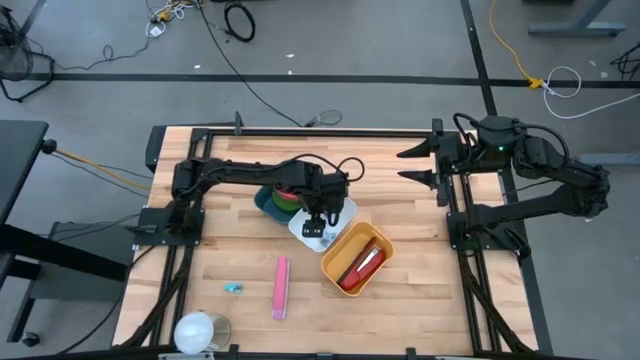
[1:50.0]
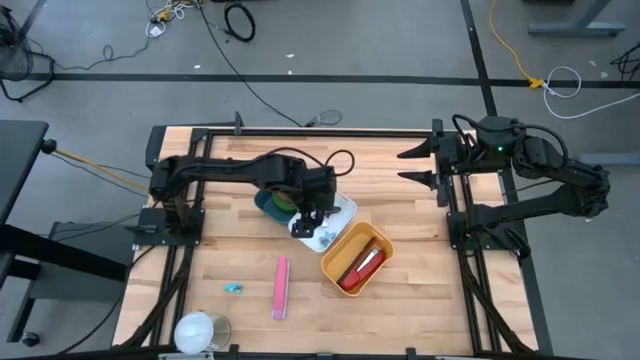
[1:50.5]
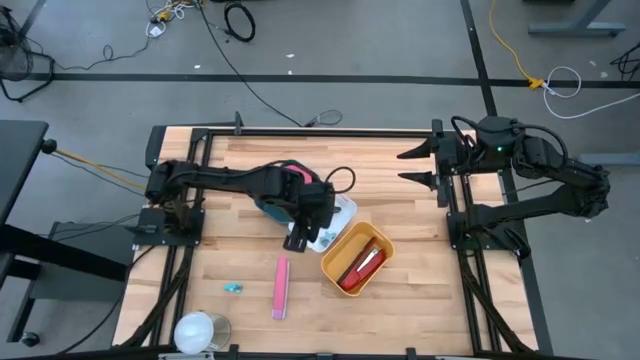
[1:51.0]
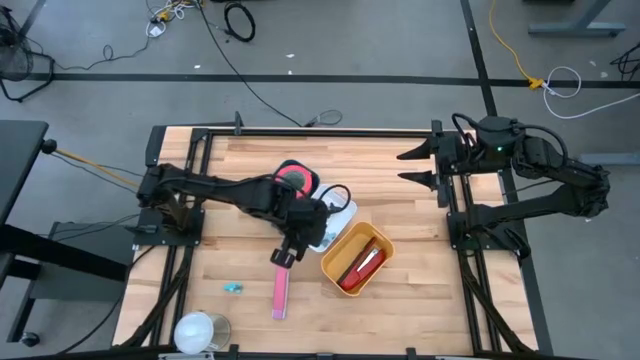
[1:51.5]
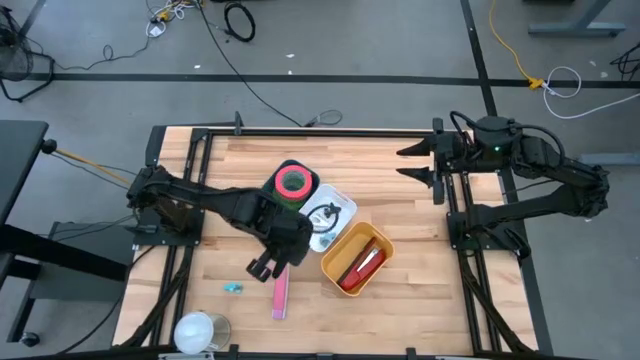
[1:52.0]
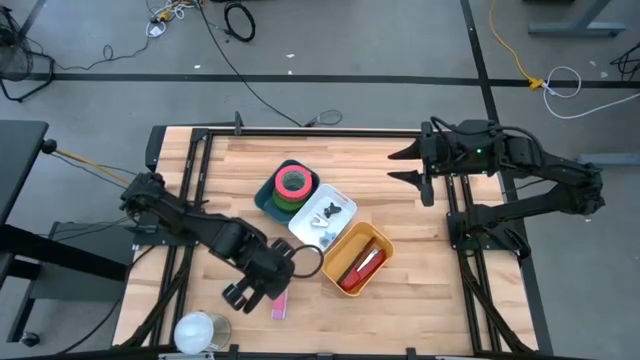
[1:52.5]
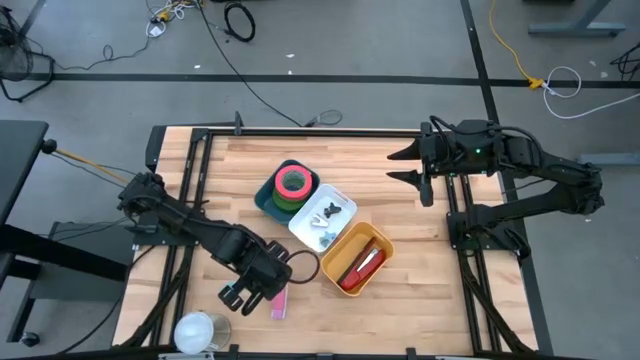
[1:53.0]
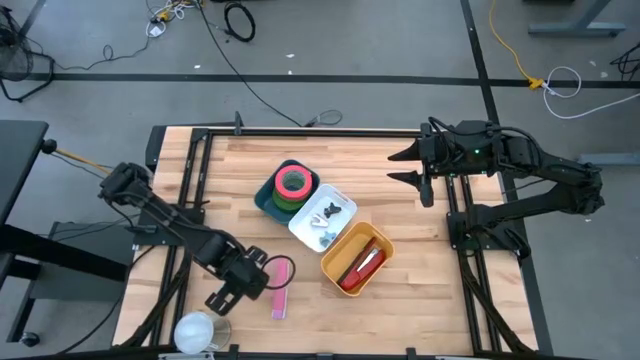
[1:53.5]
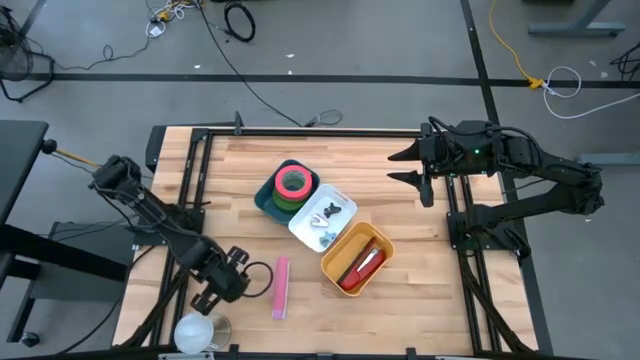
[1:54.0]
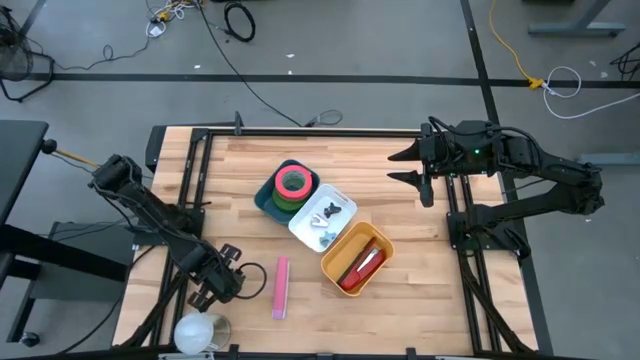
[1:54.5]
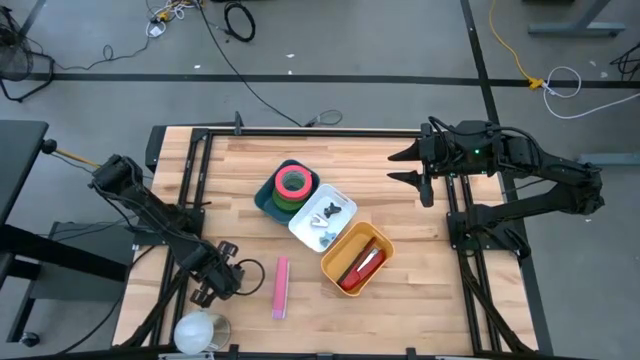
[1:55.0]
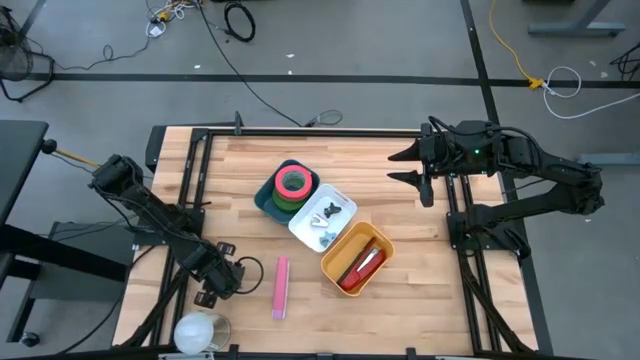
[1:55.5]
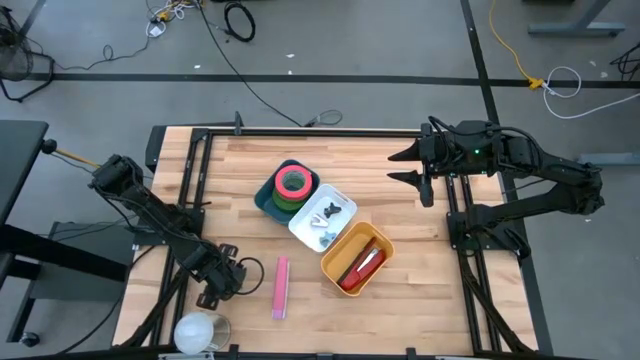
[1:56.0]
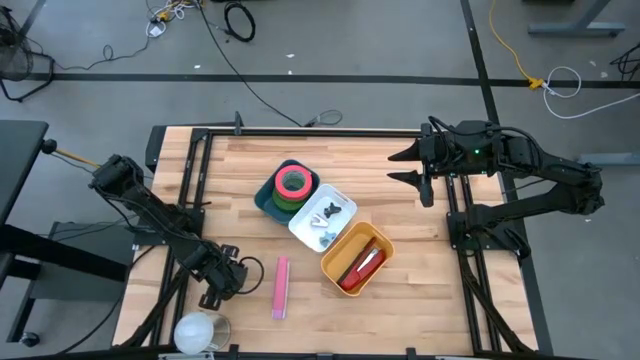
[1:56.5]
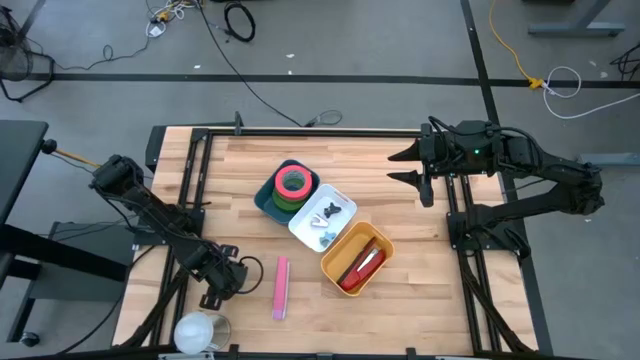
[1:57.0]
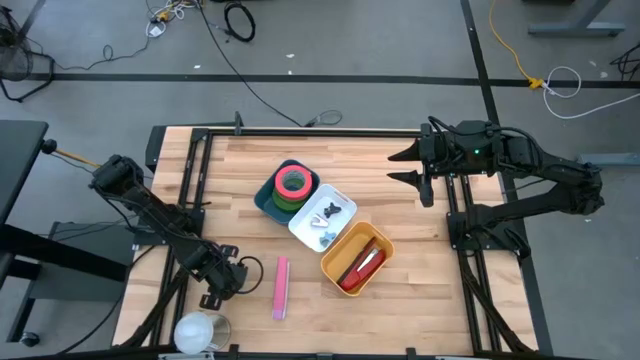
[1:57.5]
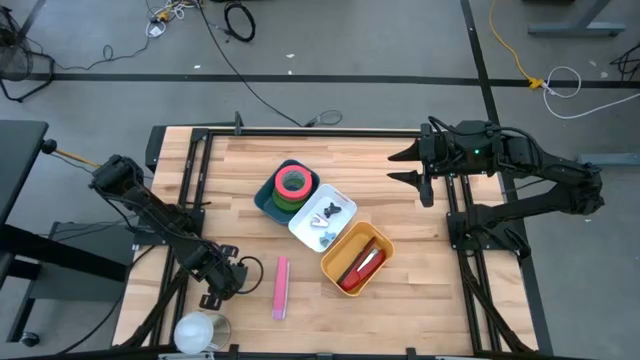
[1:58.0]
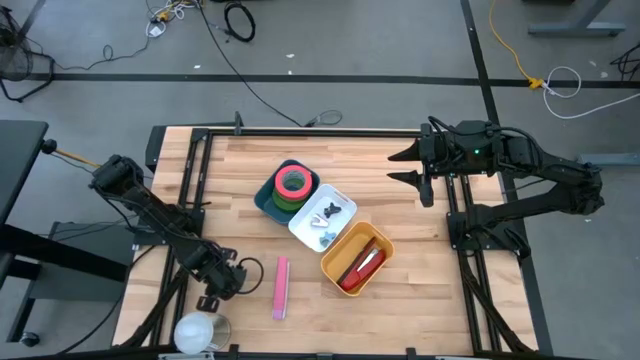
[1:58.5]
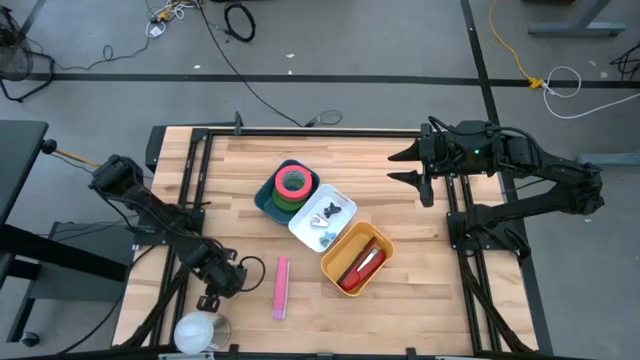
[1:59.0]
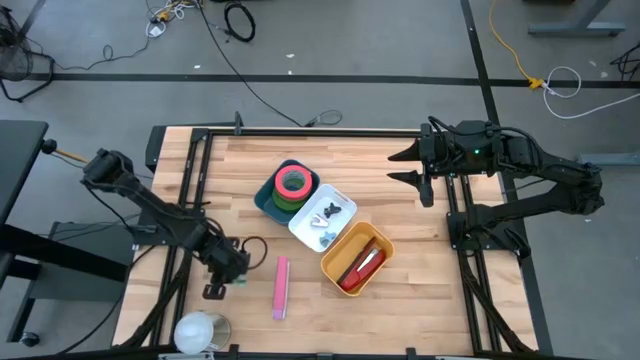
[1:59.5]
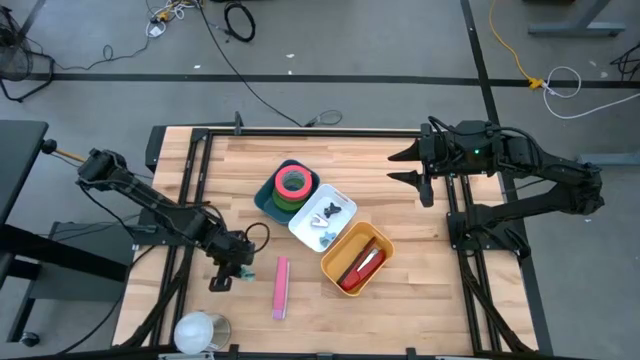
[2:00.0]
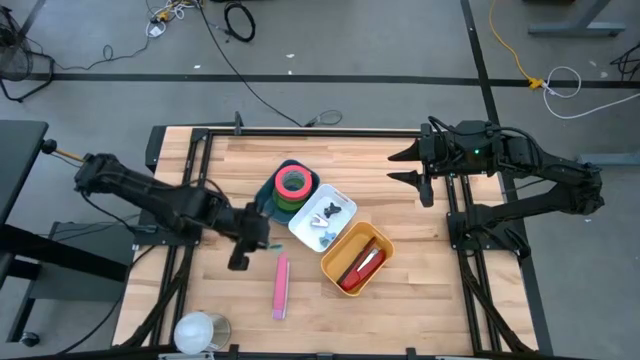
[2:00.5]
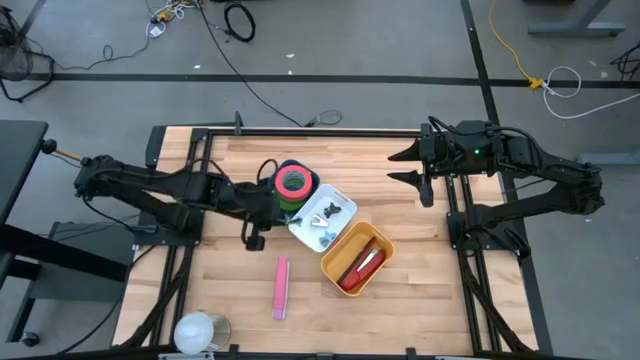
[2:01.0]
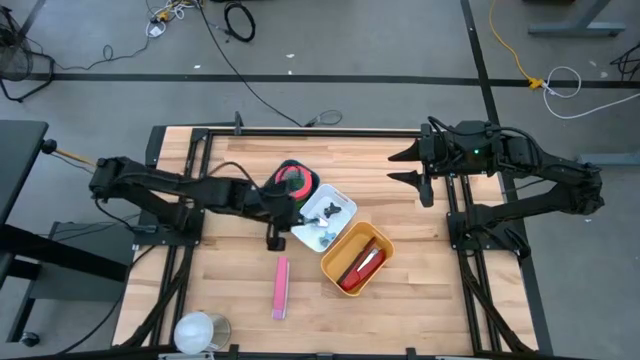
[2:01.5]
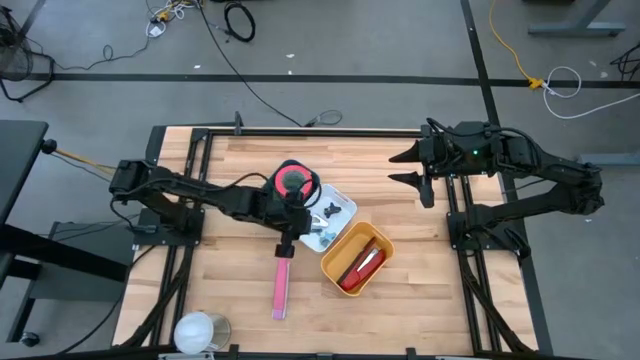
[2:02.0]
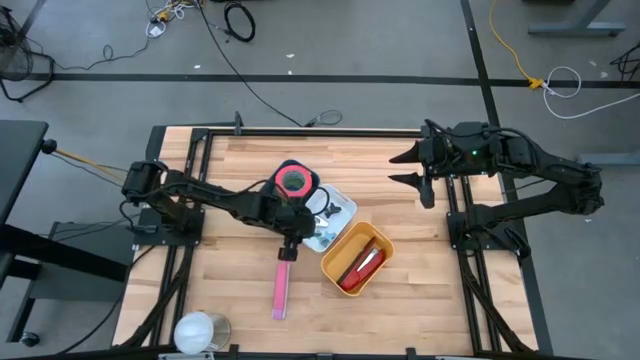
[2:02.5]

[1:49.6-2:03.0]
Task: Pick and place Stapler, Stapler remover, tape
Put the blue staple remover into the white bin

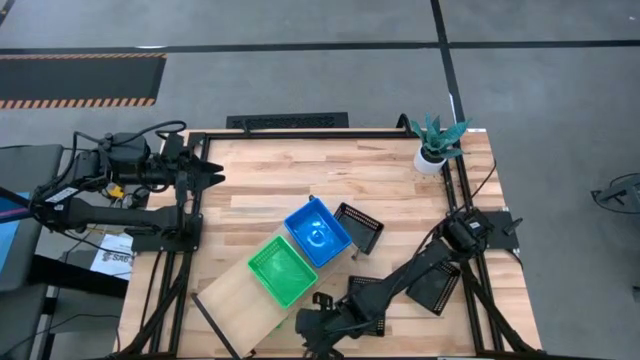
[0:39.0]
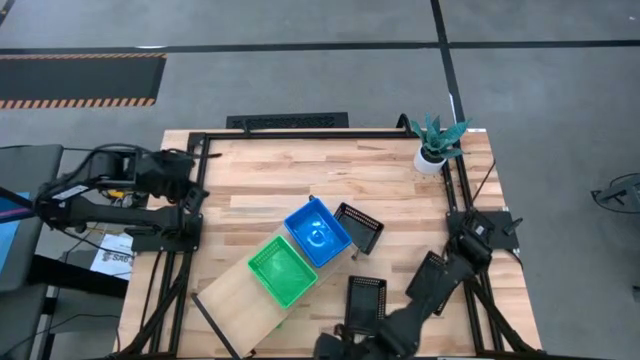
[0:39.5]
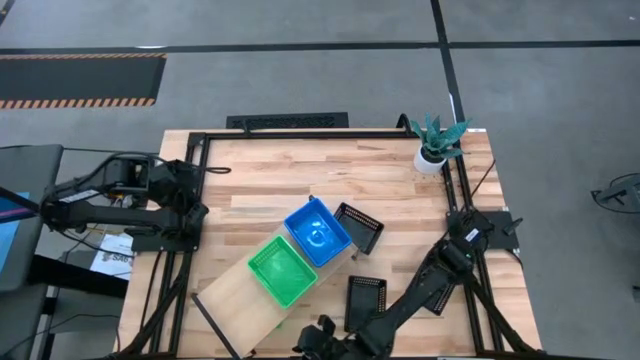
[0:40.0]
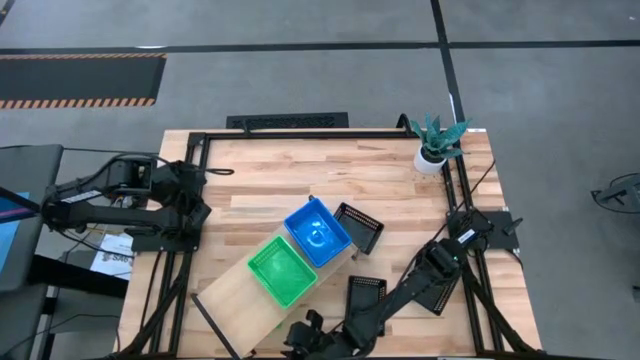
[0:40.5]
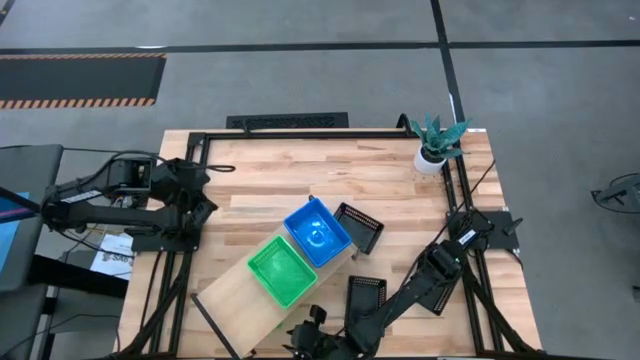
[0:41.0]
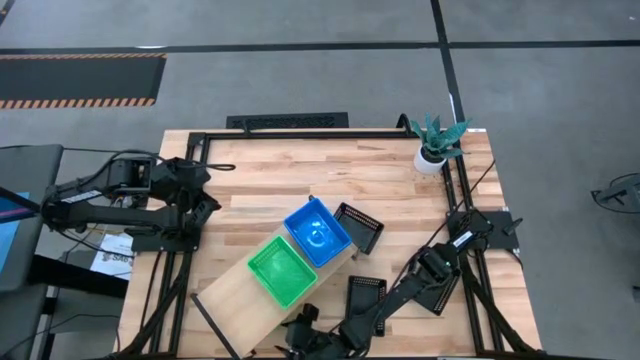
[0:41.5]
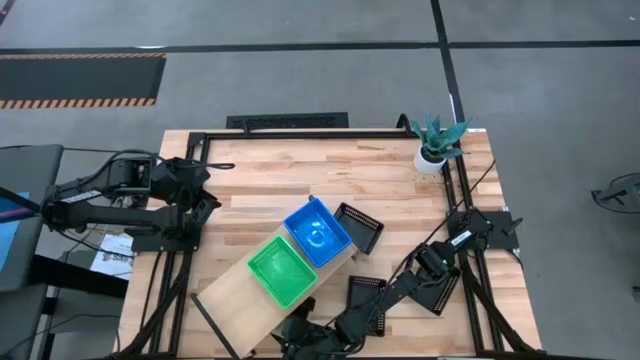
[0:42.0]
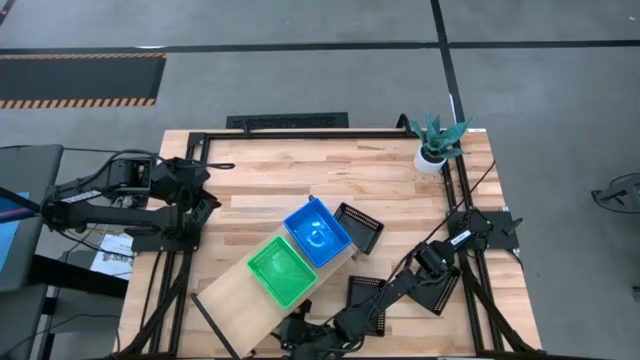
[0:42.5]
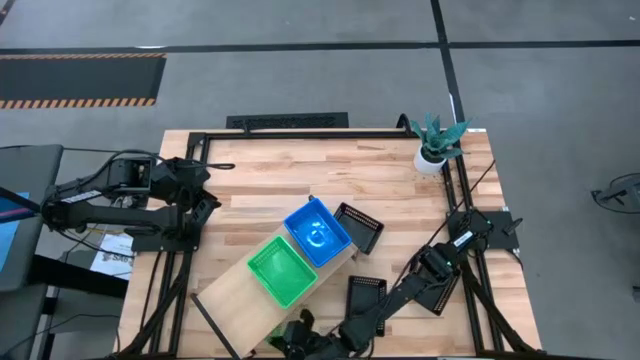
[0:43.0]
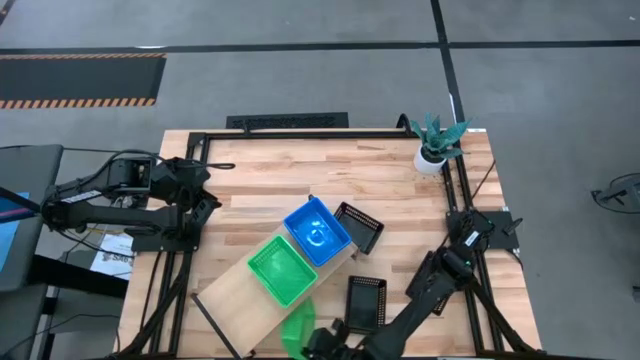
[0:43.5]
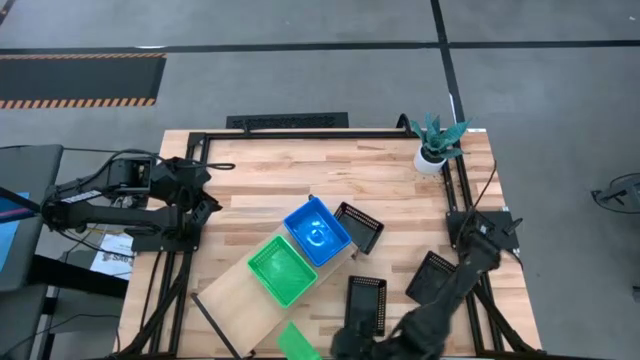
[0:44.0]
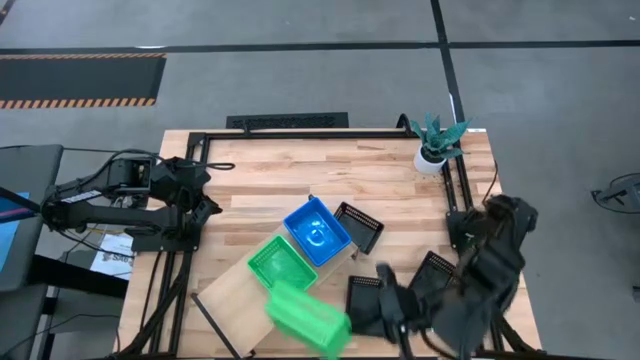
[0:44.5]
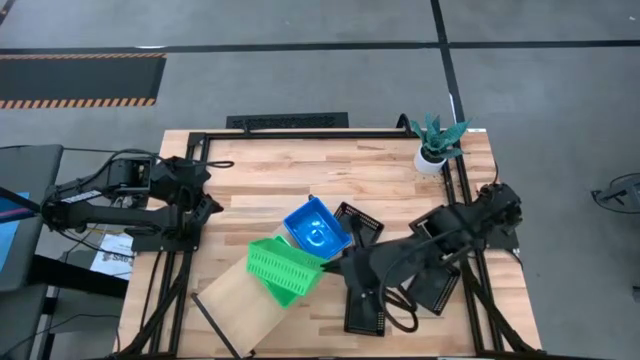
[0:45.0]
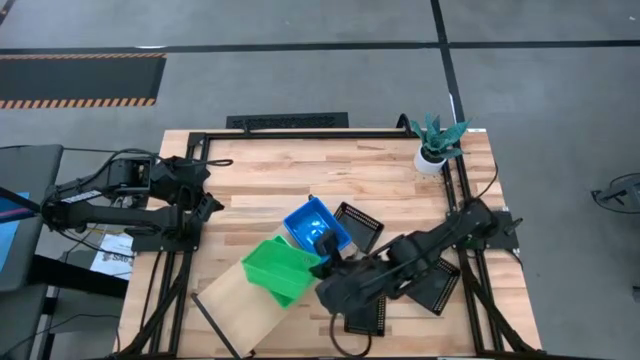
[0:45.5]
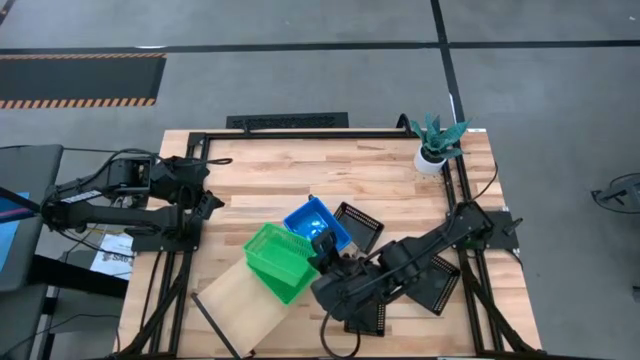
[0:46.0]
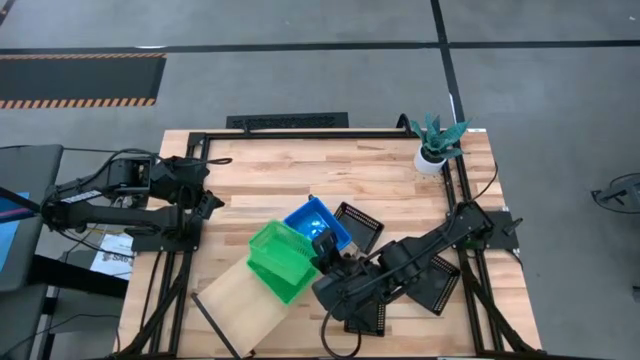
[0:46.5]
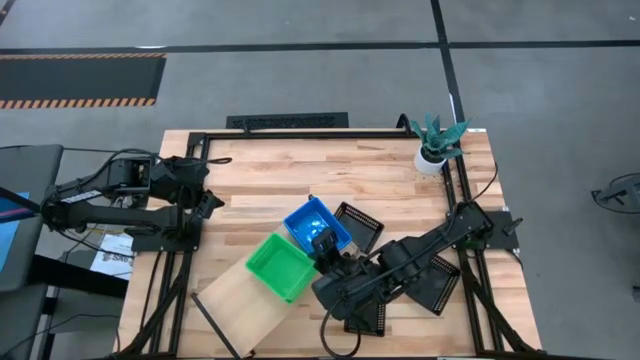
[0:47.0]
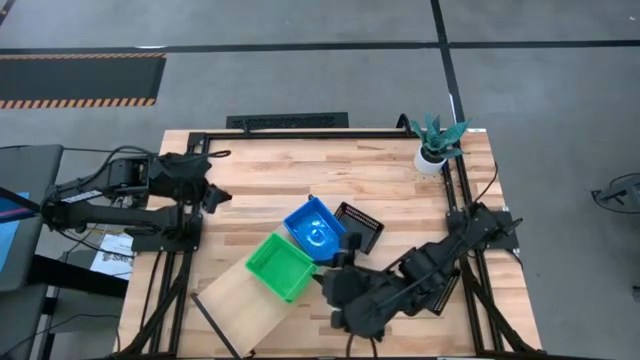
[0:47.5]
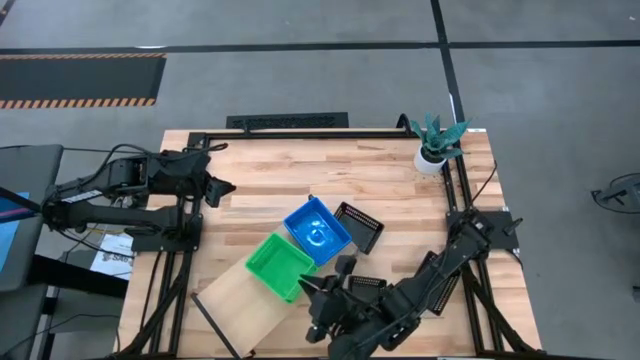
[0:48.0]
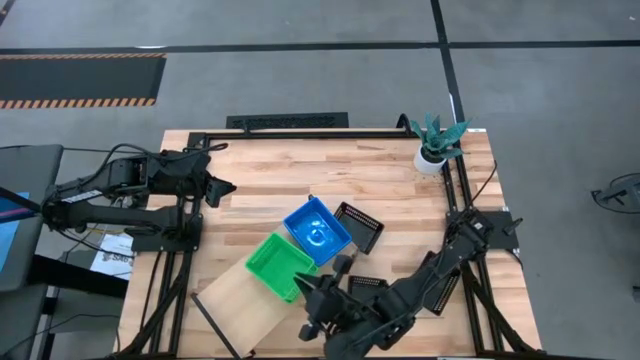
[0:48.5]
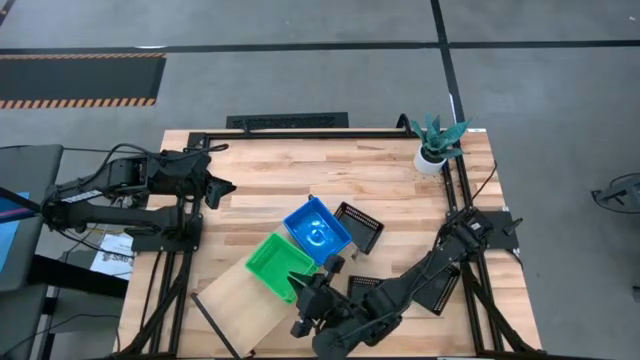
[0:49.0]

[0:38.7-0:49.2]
Task: Stack baskets on shelf by color
Stack the green bin on the green bin on the shelf
